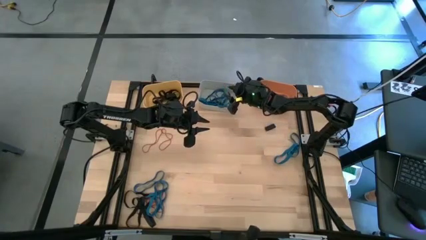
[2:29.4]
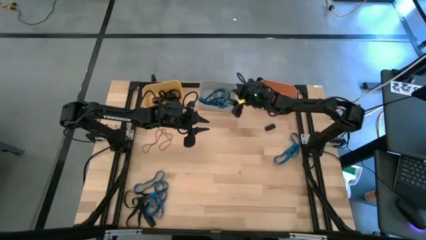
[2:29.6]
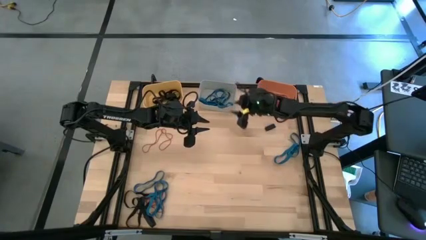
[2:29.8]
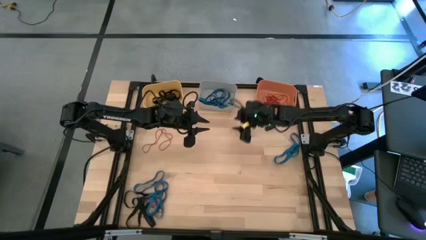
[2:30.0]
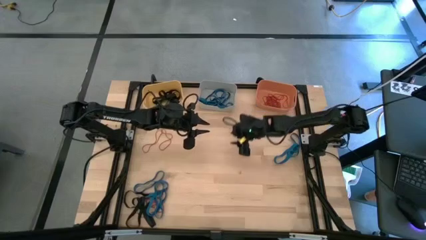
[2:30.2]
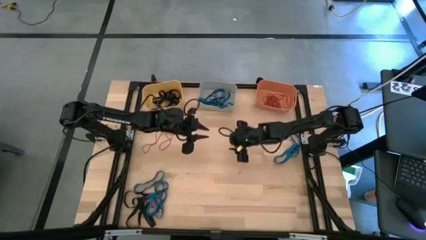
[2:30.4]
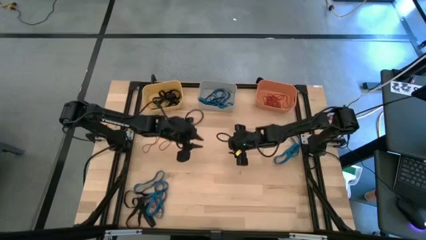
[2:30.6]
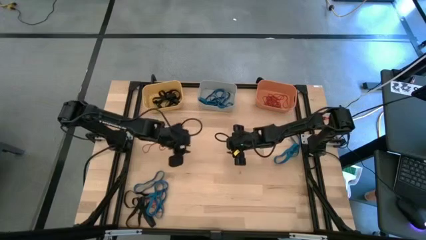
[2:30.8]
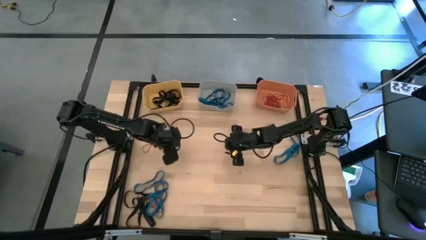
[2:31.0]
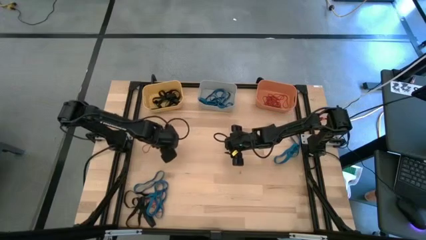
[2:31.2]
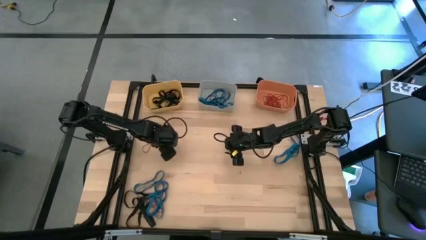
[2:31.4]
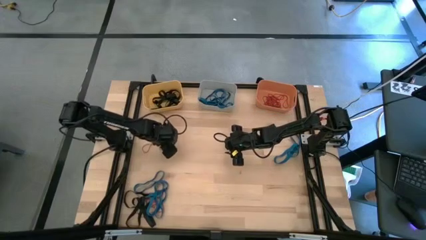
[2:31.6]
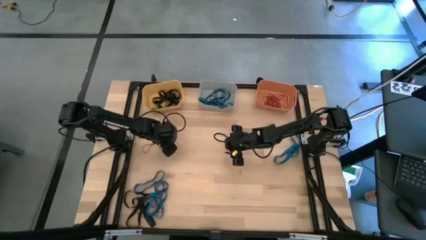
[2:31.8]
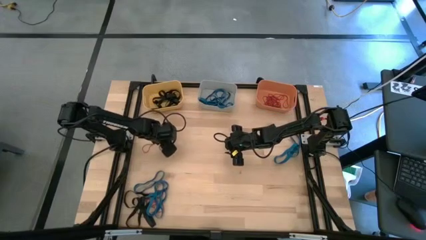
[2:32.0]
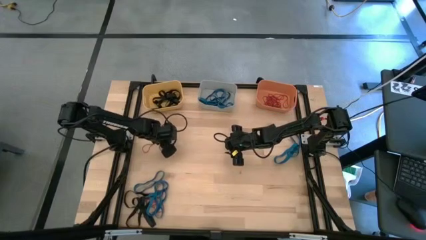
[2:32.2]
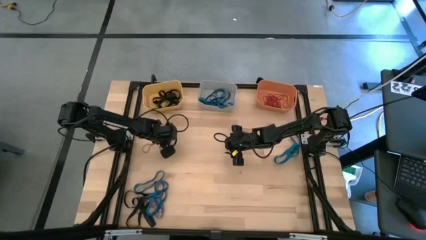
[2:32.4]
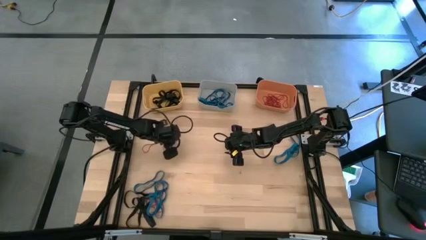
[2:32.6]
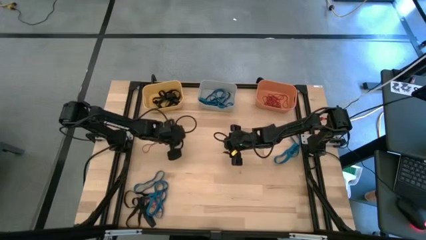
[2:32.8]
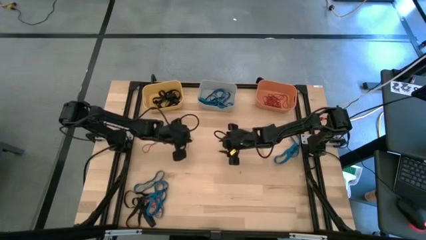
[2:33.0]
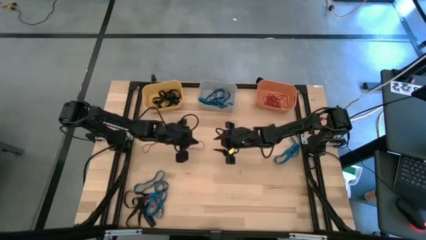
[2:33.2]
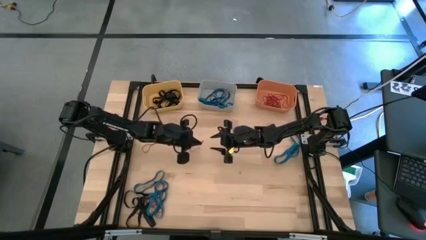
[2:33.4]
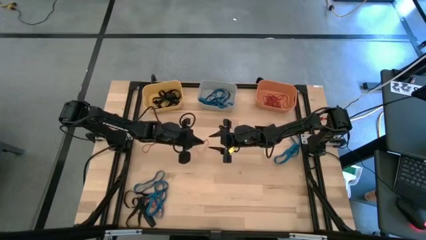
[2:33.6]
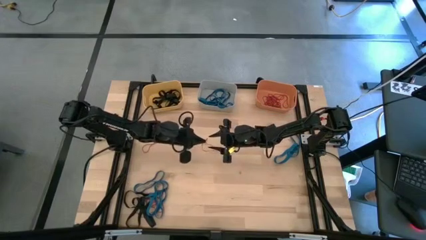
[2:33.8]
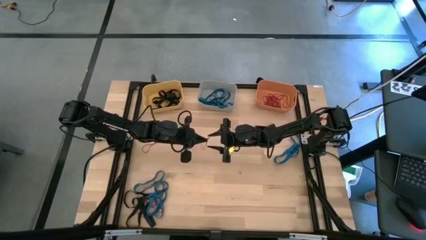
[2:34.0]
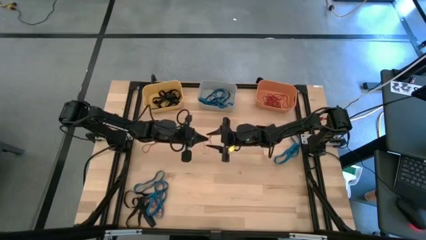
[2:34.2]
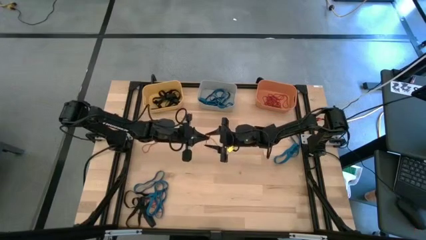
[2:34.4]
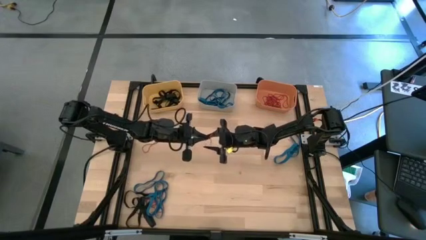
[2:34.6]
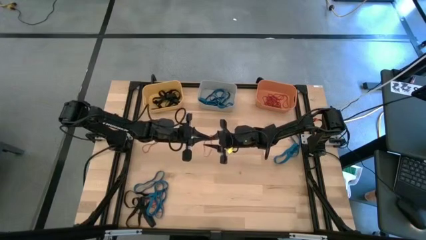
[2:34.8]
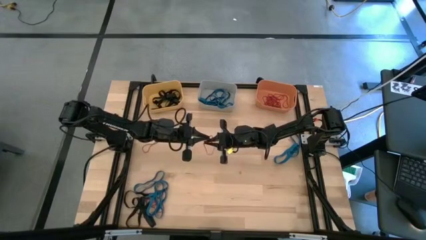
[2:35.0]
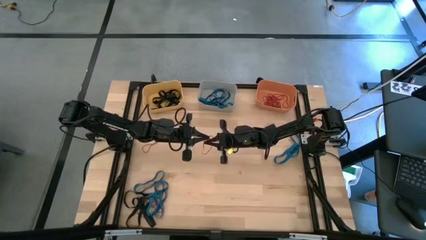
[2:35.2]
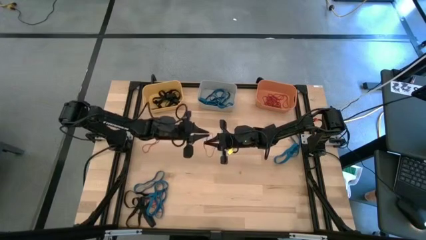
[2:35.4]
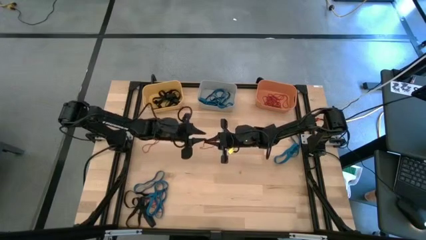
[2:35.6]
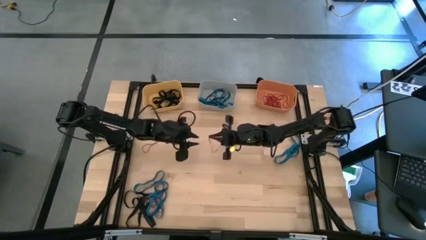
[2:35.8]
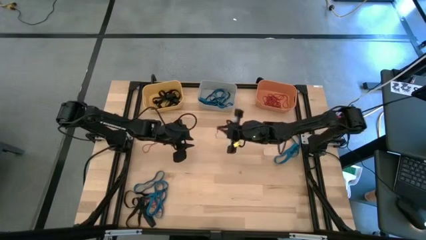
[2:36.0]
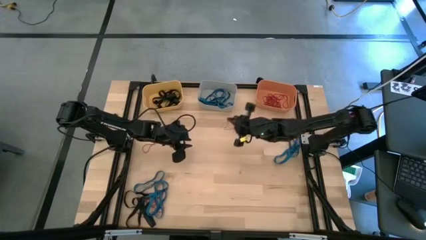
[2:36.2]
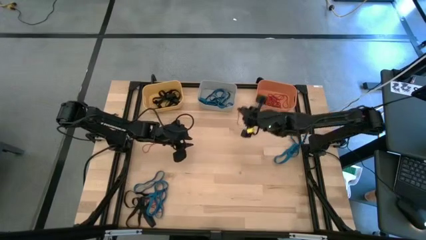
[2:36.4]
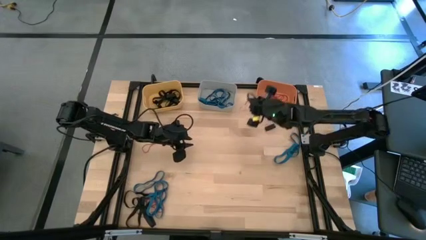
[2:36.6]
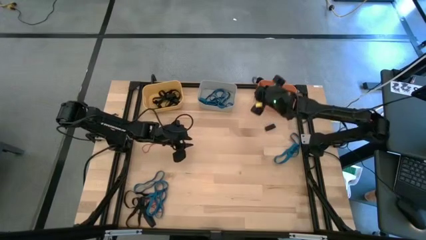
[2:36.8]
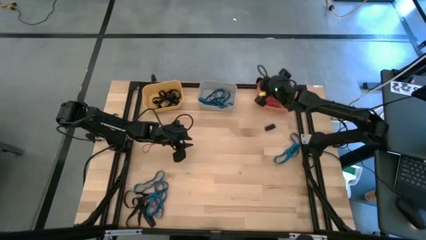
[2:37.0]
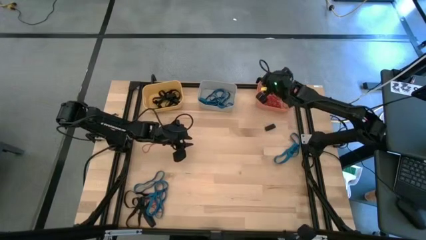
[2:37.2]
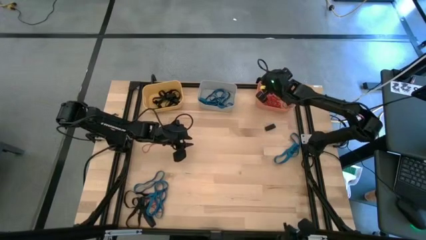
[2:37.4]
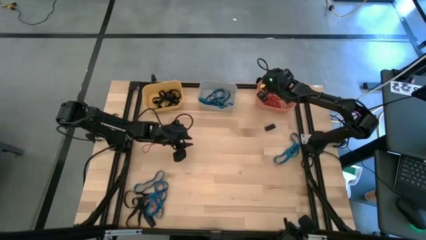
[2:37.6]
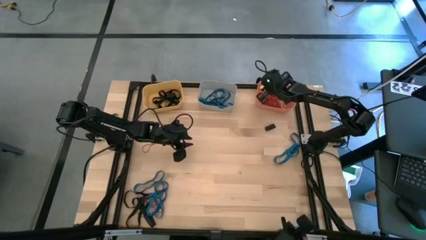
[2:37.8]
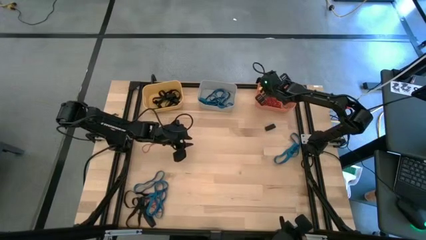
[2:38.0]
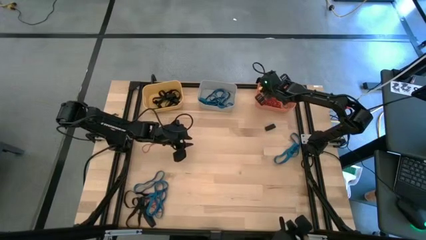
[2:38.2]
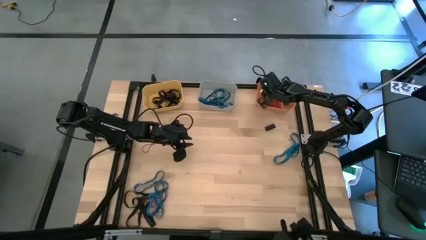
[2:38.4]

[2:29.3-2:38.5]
Task: Sort rubber bands into baskets
Put the red rubber band into the orange bin

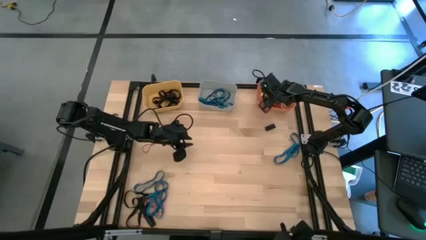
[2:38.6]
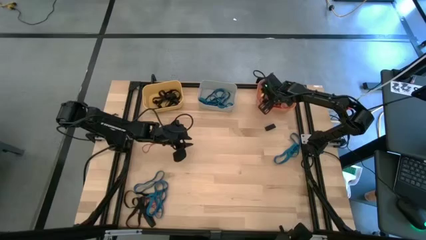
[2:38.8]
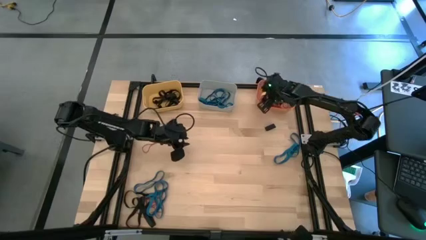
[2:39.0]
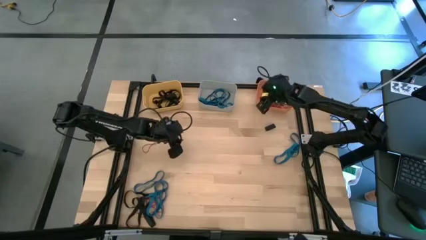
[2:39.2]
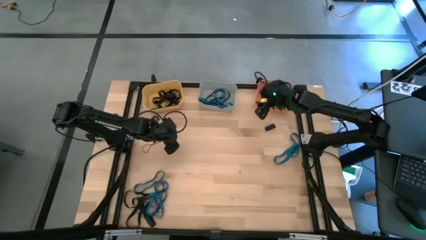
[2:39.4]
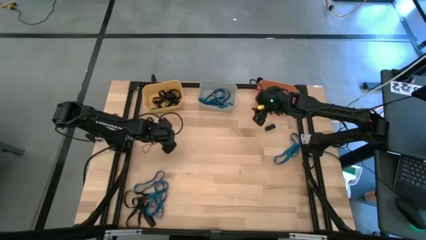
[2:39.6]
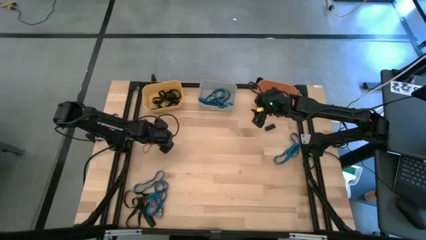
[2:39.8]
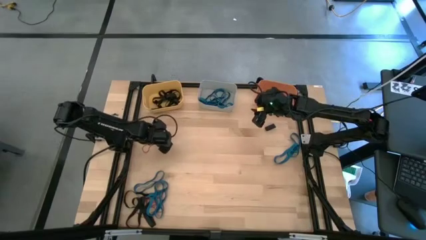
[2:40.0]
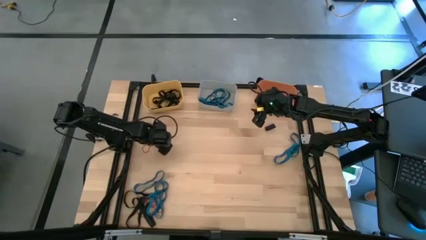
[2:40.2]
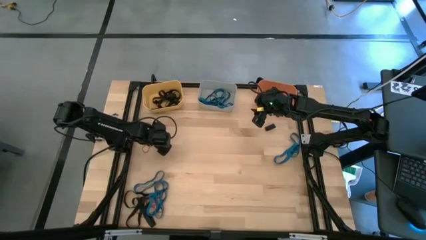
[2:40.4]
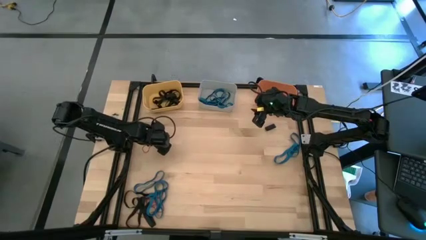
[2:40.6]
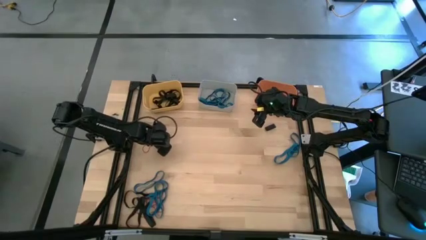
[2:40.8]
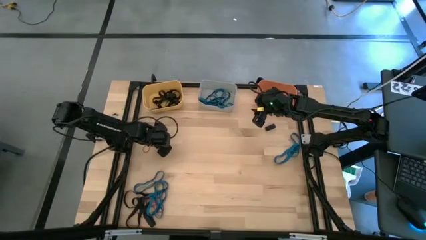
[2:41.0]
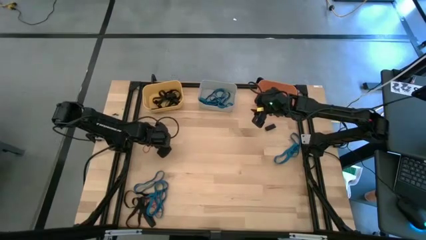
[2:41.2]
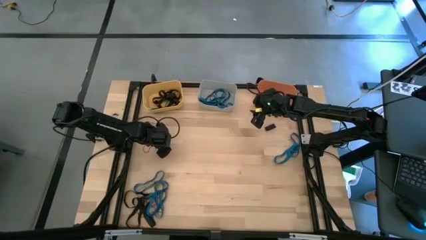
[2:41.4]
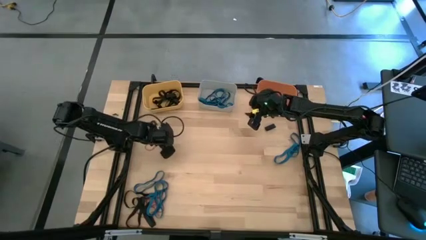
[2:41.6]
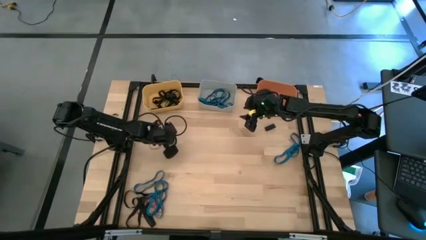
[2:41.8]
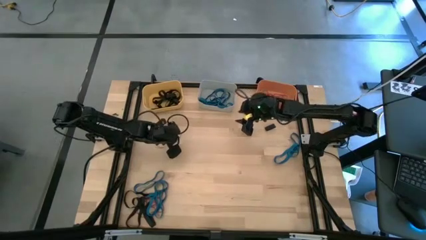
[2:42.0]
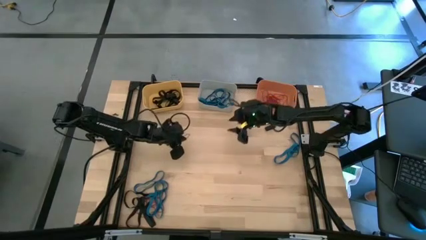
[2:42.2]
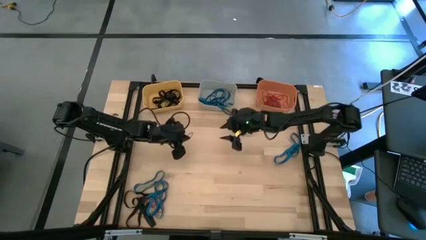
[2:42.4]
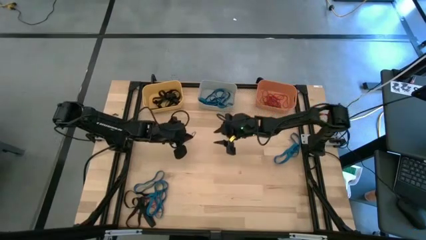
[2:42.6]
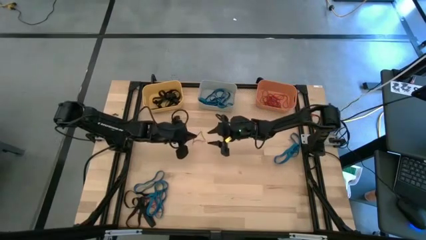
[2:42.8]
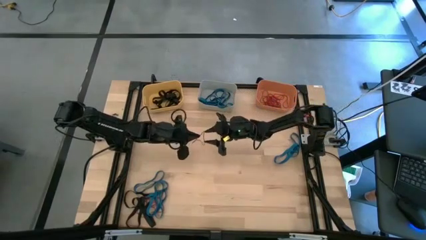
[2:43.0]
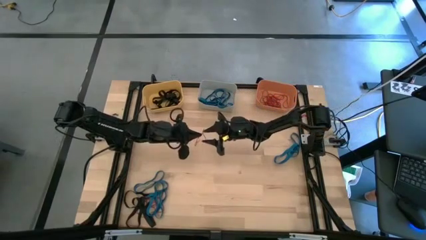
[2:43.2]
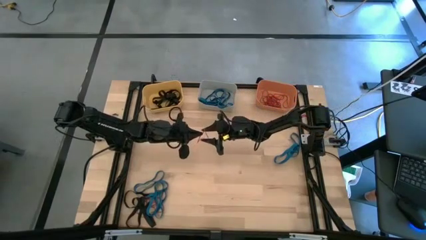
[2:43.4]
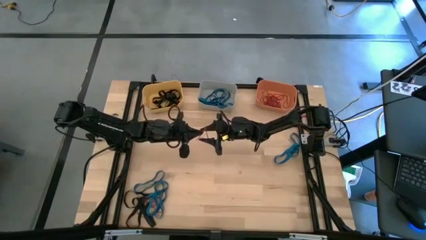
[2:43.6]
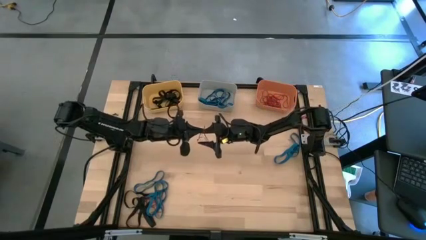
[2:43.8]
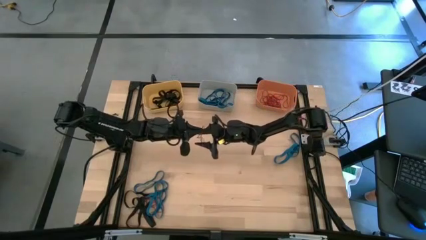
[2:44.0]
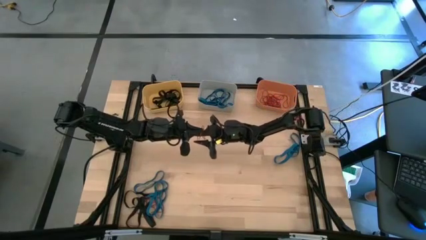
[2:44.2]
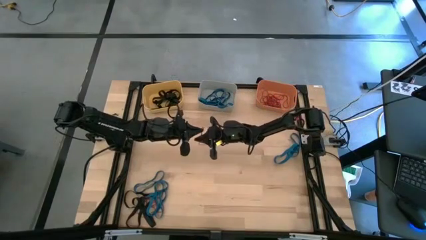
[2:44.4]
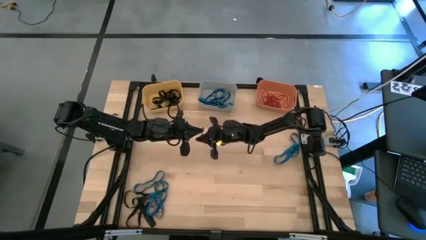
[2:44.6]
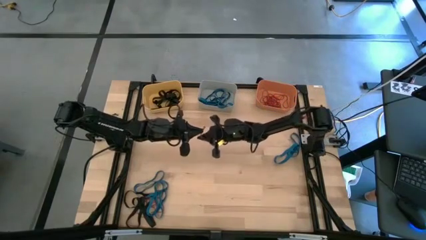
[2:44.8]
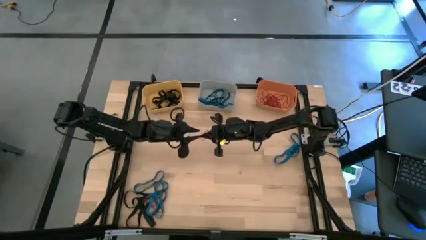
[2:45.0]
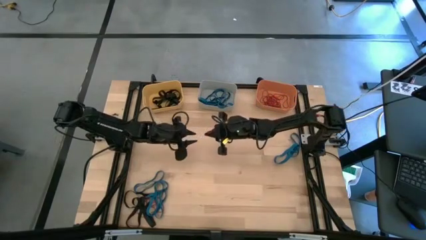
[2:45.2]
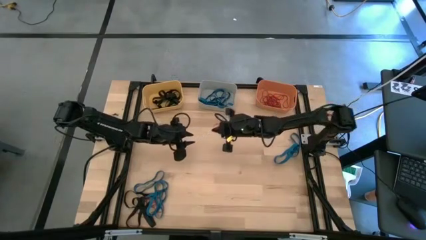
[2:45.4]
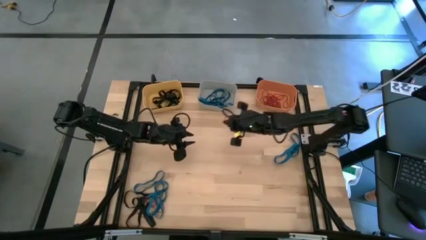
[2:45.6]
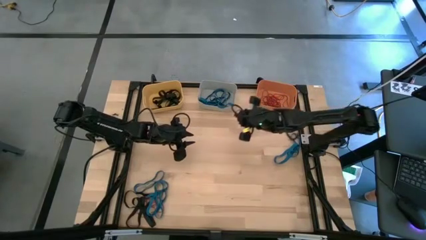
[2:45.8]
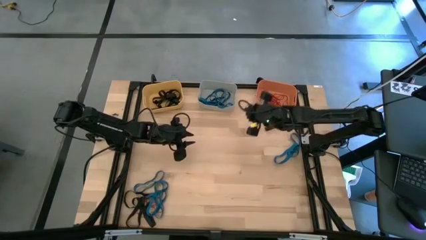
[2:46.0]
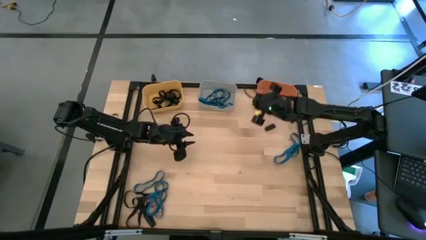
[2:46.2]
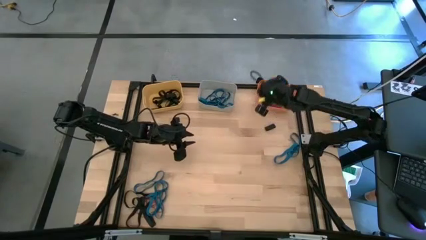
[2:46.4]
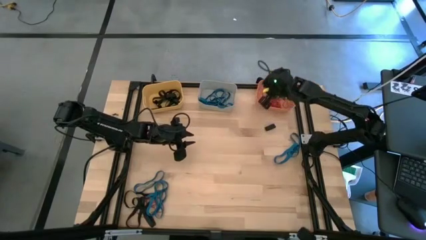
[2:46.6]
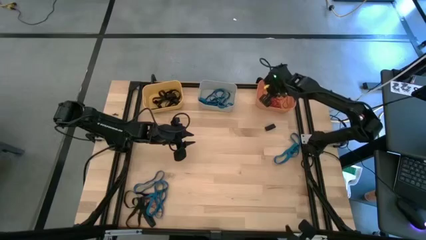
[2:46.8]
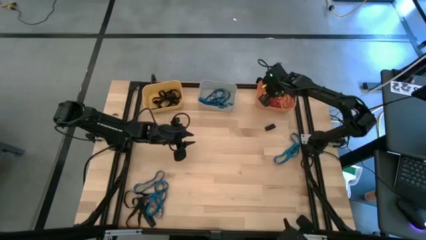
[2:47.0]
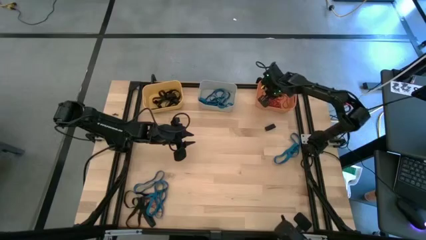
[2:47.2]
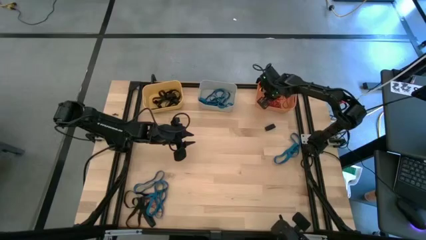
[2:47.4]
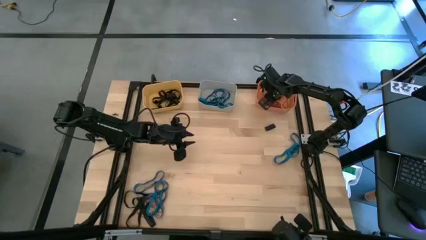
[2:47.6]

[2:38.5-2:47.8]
Put the red rubber band into the orange bin
